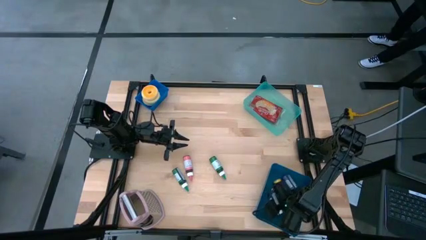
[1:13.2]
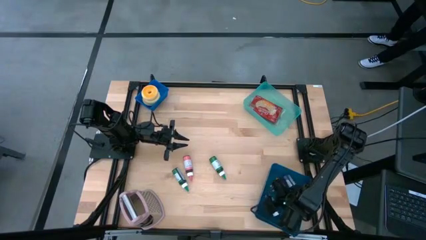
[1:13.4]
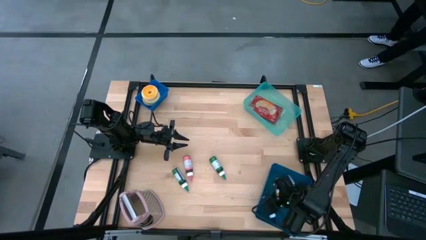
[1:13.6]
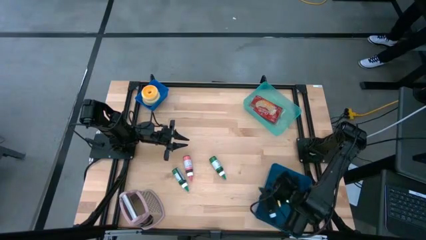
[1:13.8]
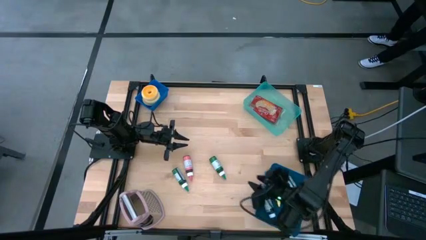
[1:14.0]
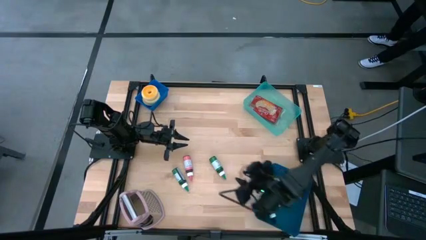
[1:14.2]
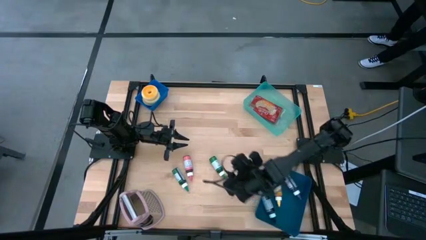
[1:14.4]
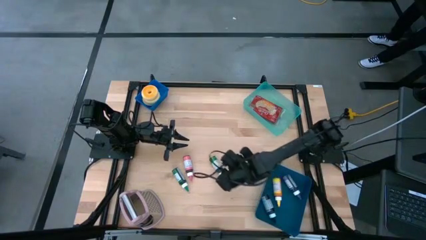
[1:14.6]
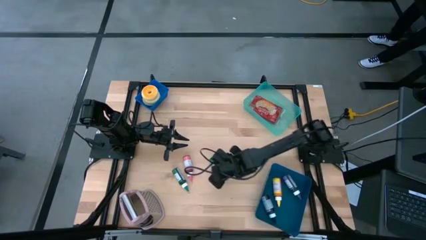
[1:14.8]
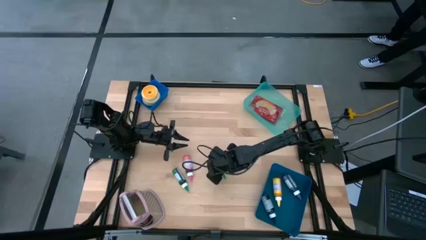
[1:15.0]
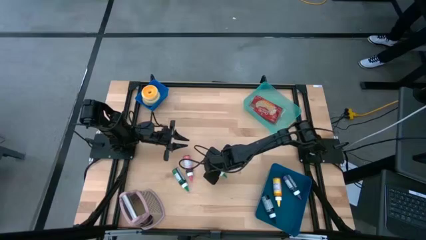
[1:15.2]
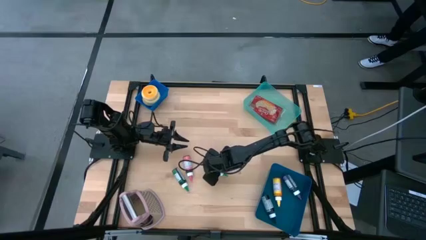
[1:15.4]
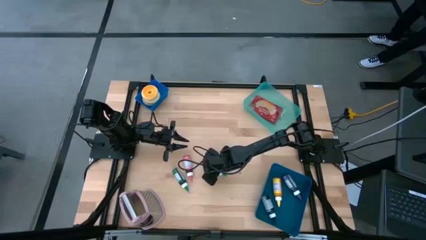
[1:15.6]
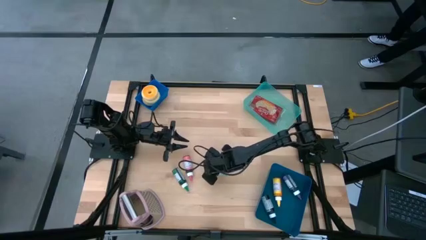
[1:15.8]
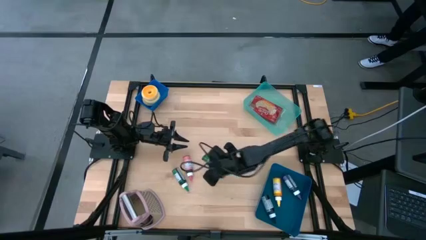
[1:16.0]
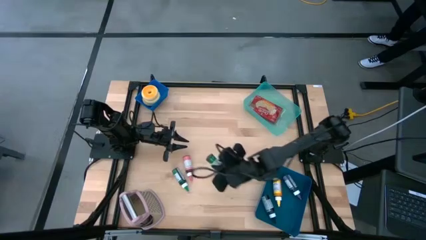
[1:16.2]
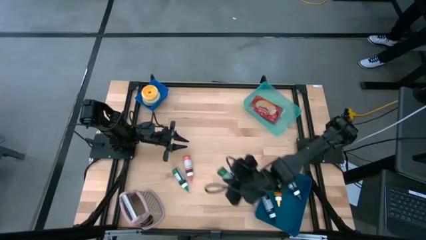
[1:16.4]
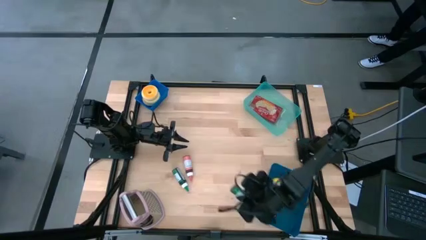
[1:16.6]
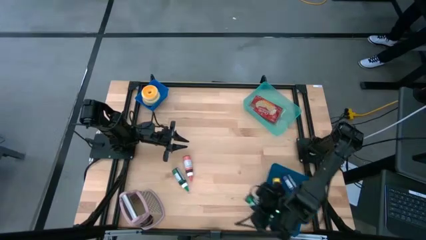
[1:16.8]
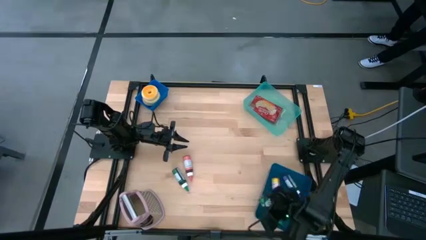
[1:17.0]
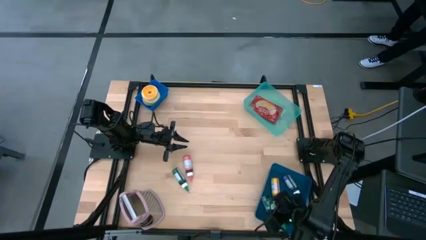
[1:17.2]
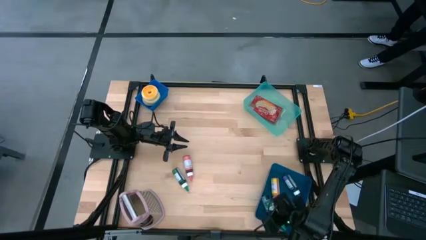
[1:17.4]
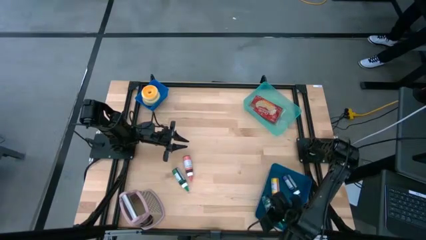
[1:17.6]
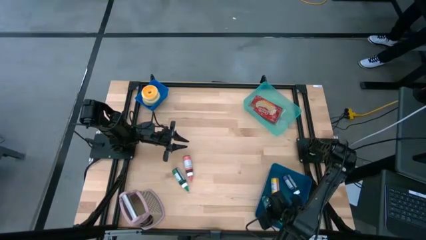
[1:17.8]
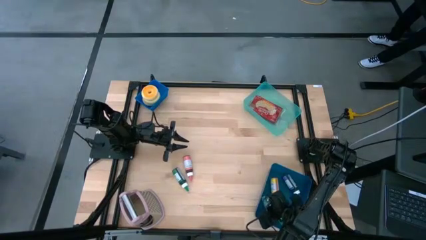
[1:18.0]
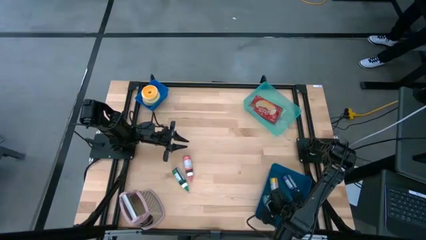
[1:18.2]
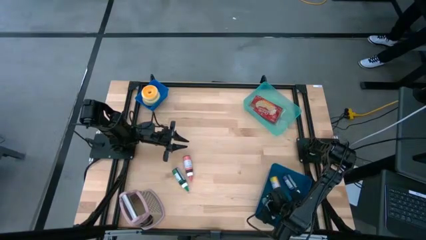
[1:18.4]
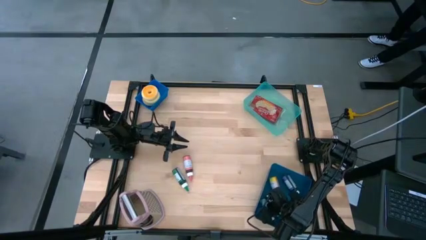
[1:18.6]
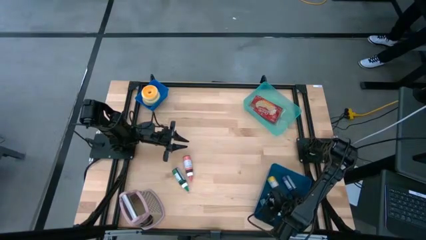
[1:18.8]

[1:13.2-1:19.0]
Put the right green food coloring bottle into the bottom blue bin

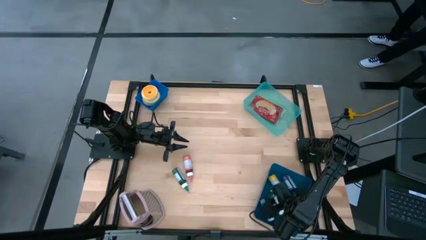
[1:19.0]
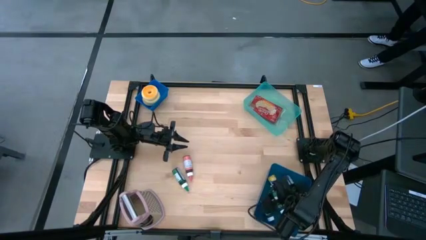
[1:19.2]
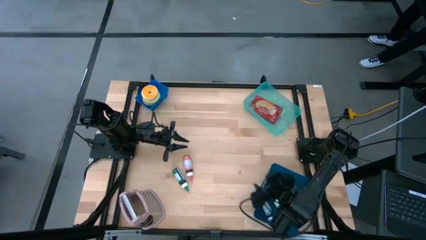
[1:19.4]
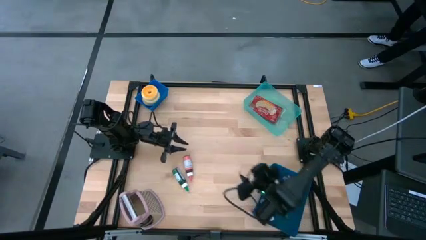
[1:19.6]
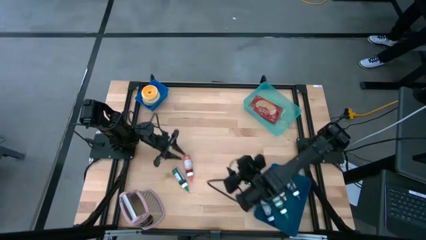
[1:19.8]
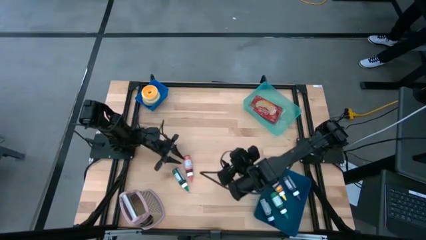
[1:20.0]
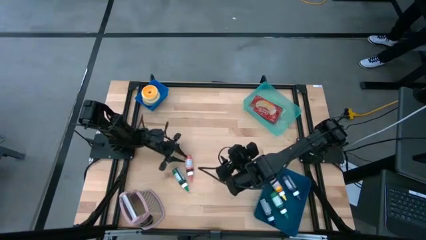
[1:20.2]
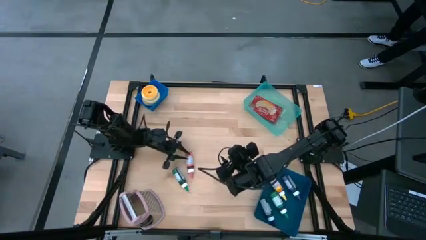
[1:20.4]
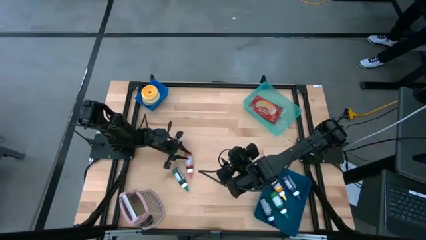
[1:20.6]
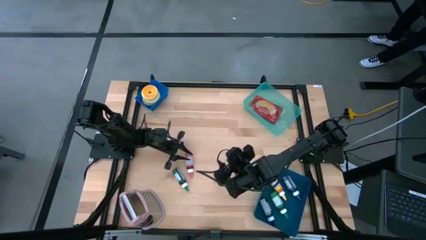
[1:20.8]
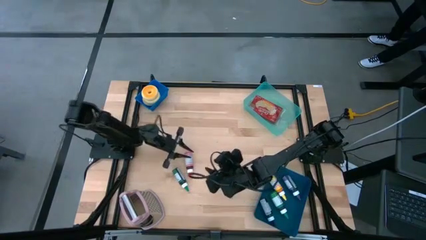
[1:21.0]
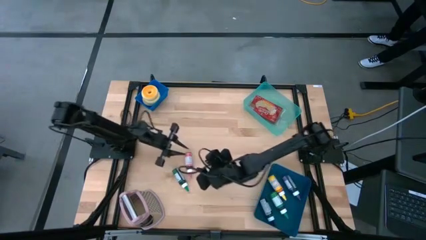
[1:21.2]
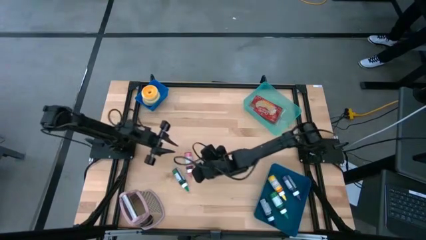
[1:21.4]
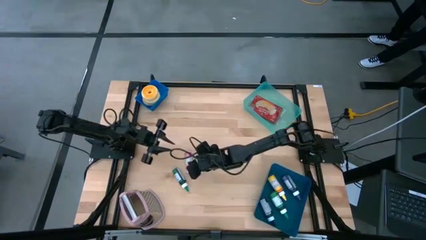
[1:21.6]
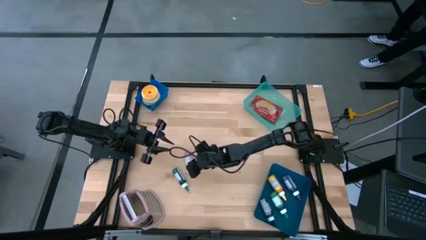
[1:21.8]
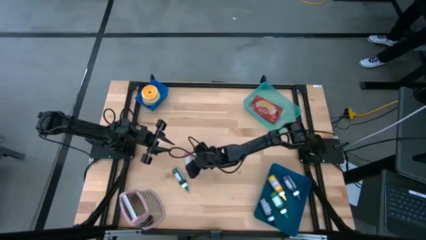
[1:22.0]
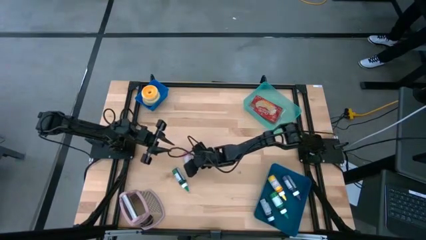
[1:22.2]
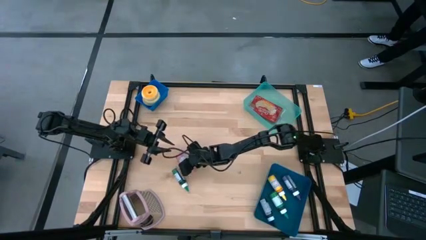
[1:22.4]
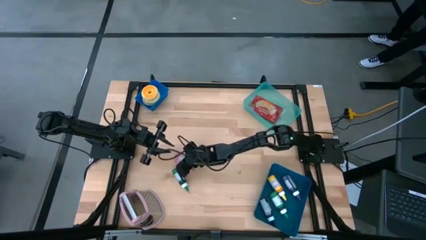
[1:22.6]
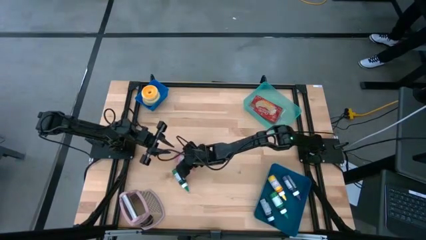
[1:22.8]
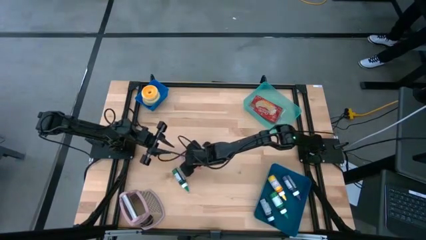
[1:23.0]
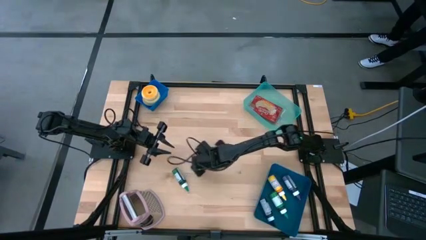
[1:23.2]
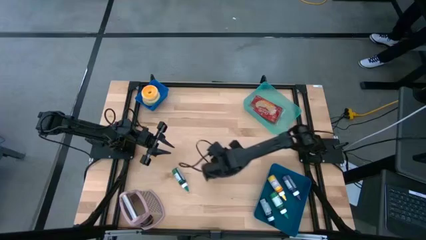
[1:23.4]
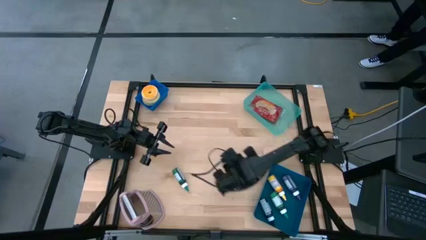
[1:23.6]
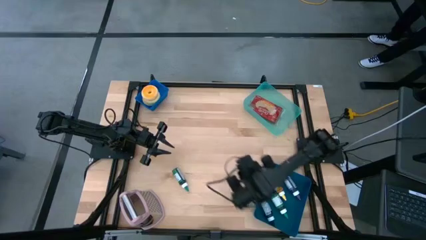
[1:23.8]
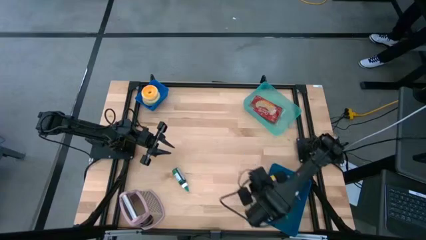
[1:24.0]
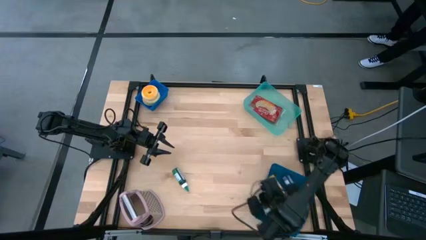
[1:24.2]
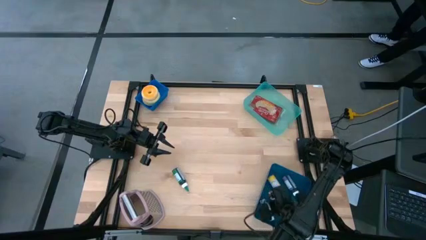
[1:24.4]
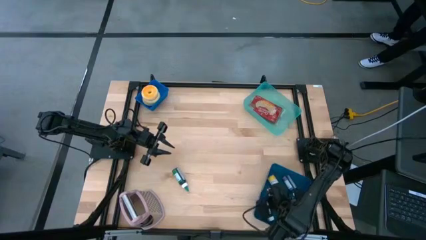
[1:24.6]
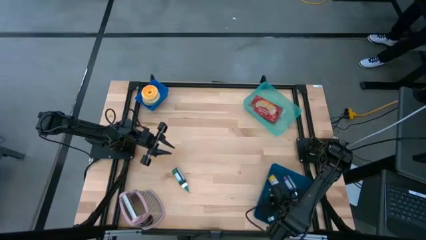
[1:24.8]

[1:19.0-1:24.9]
Put the pink food coloring bottle into the bottom blue bin

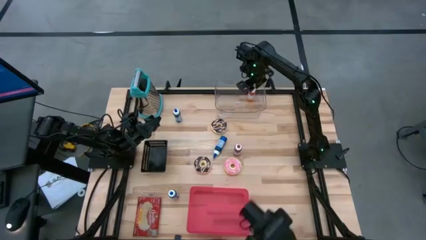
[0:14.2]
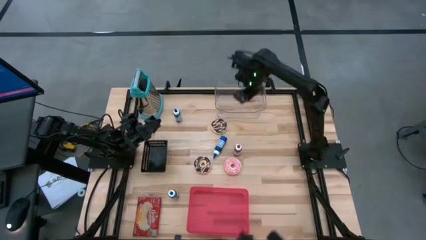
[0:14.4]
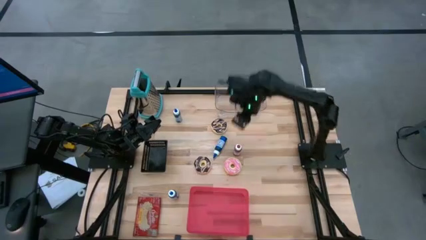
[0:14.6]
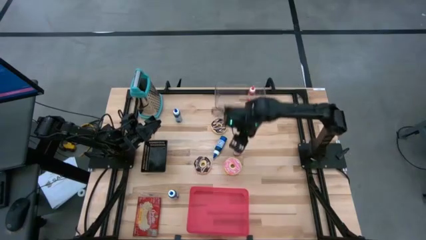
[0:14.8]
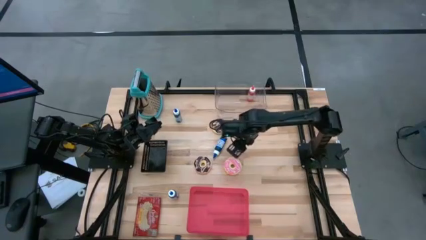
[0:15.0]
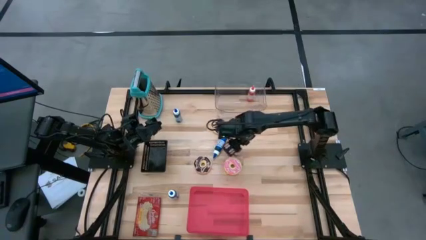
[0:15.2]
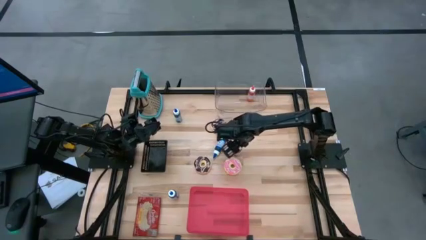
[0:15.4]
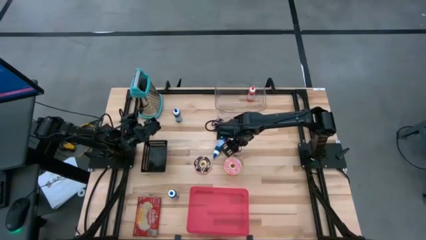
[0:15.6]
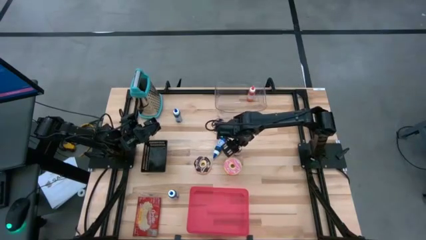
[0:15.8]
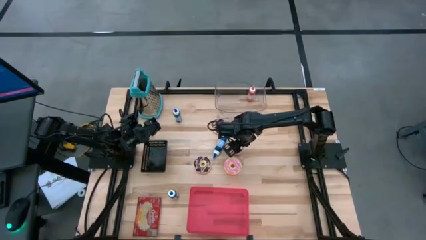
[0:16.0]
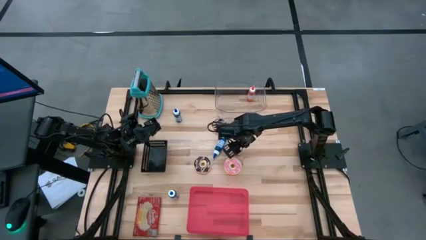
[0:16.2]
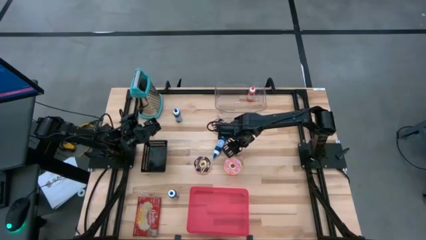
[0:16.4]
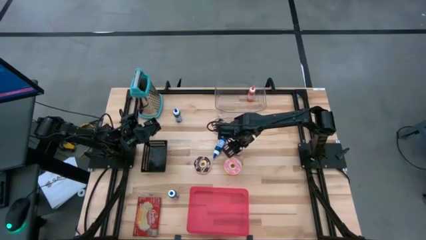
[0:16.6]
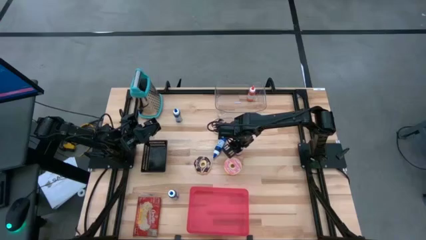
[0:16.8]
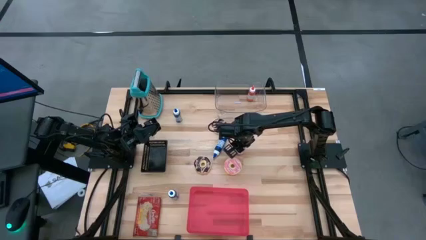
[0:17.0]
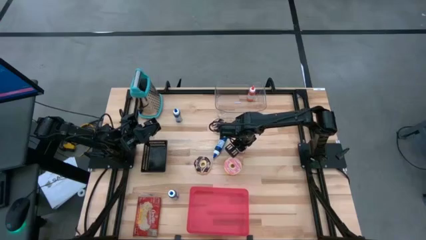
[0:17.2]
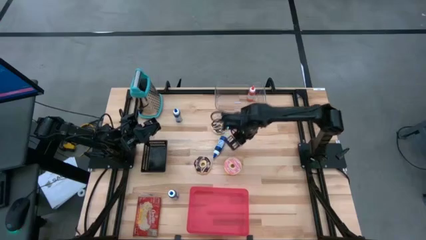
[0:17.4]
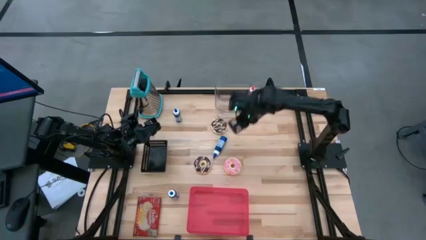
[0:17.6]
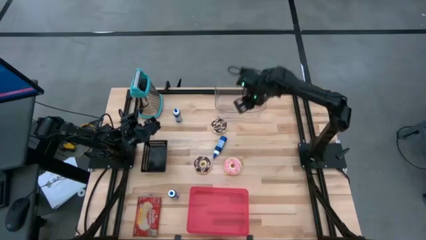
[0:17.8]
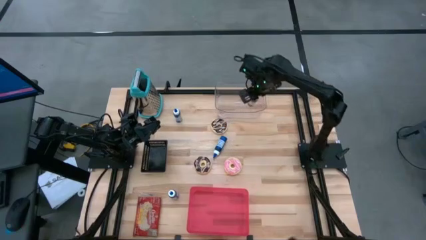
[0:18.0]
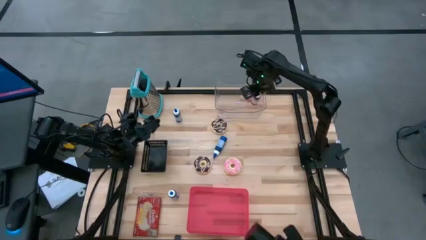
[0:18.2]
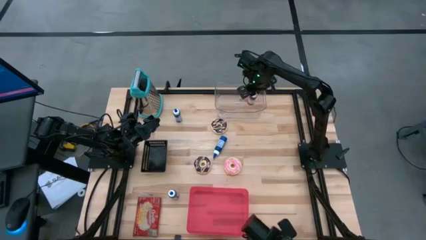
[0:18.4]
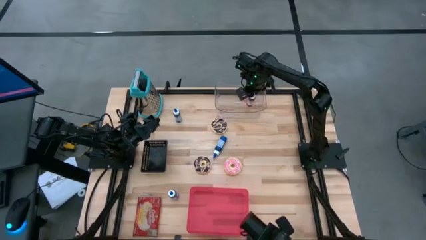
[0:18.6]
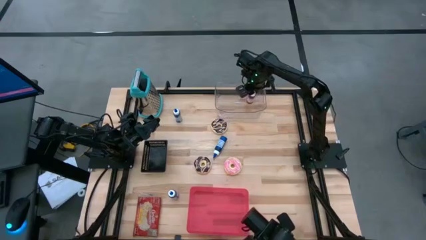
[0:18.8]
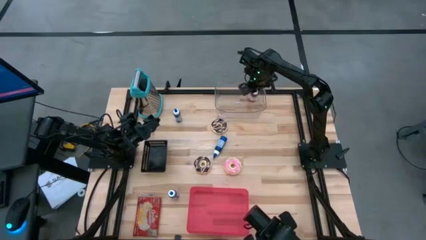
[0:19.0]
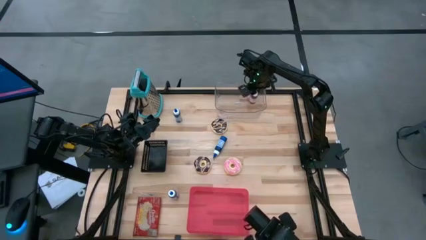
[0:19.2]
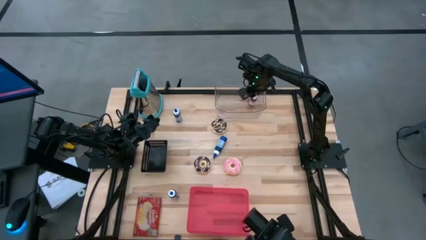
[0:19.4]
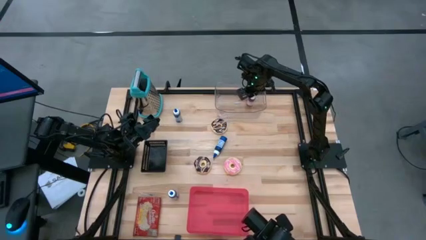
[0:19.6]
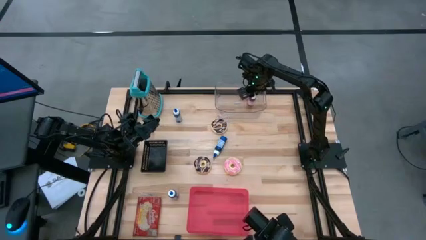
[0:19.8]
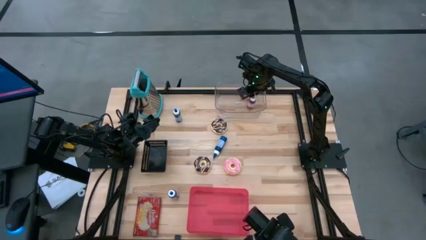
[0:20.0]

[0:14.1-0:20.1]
Put the red food coloring bottle into the transparent bin
